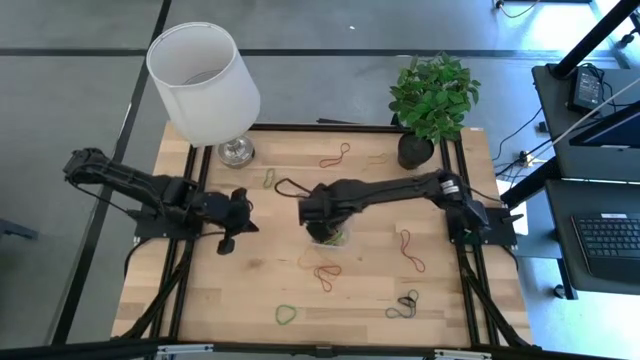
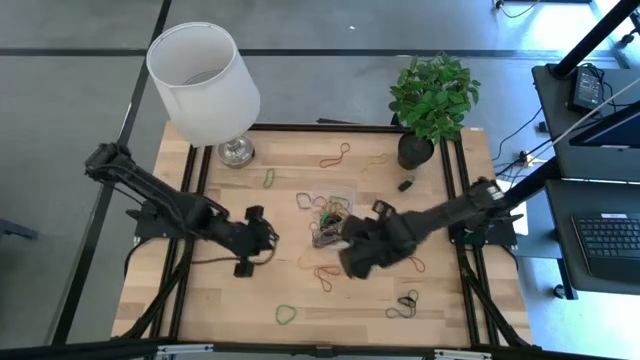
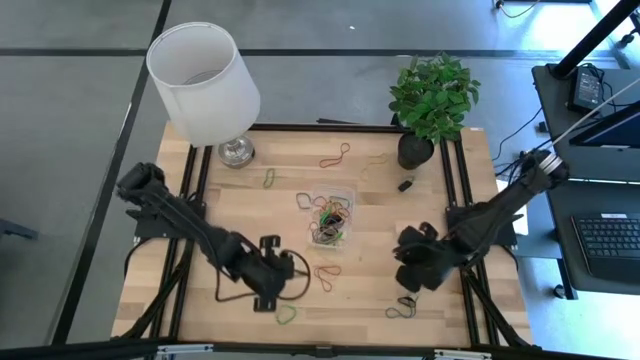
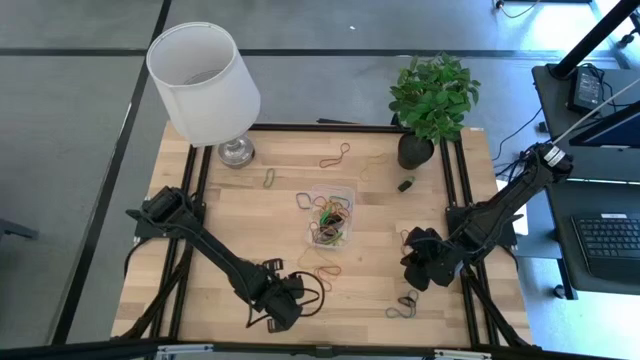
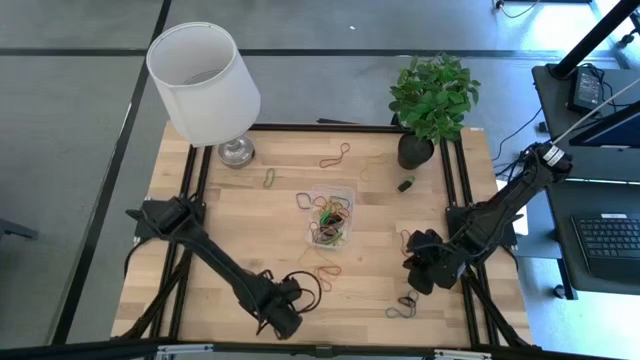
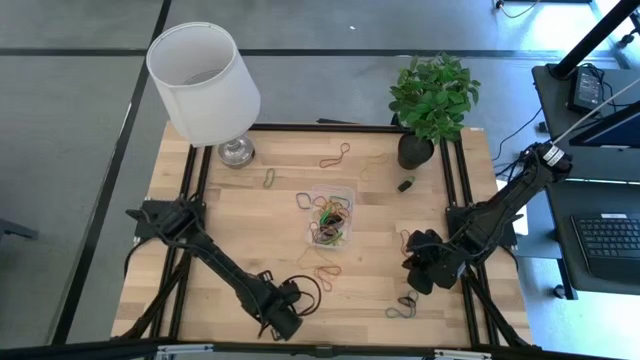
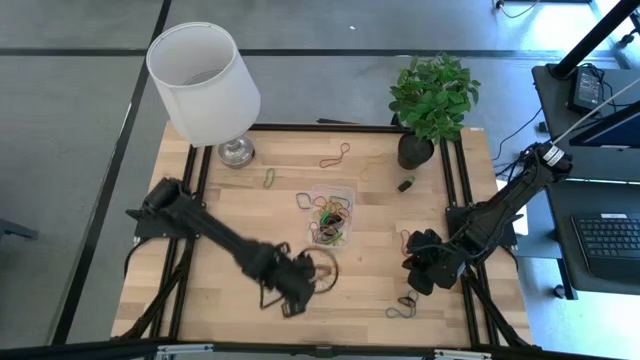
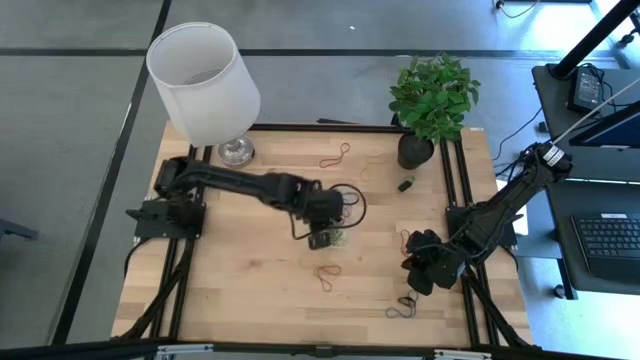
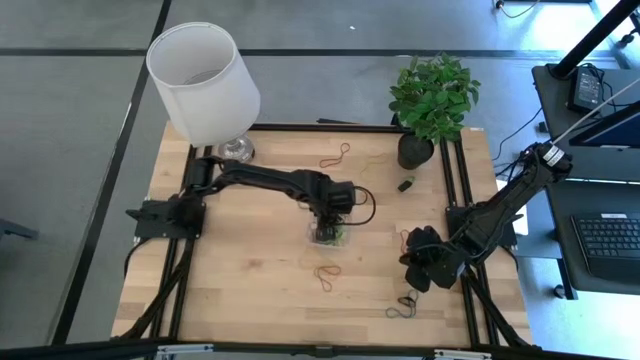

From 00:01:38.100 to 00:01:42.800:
Task: Pick and place rubber bands into bin
Put the bottom green rubber band into the bin

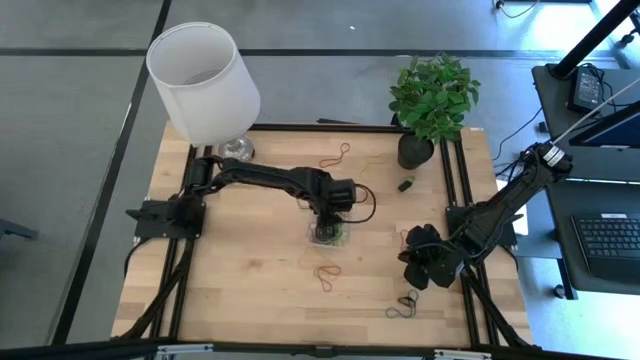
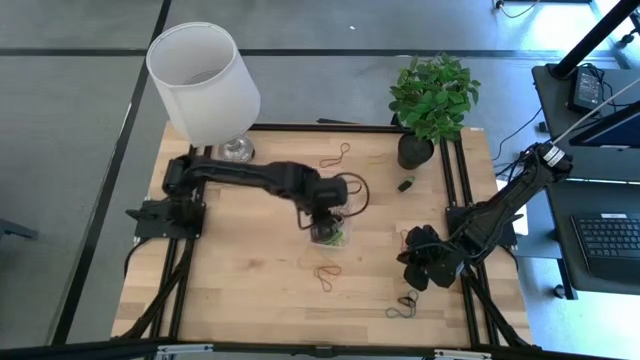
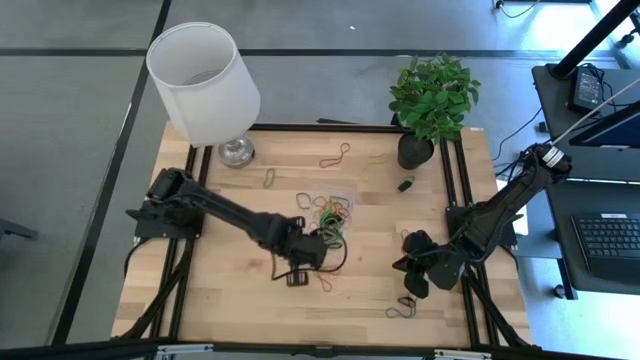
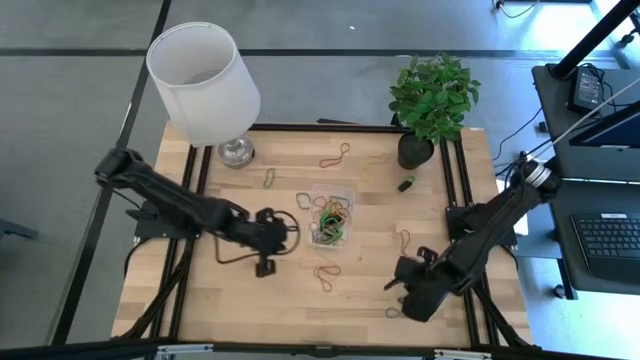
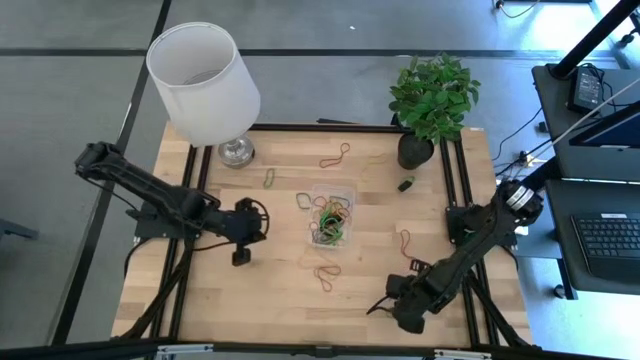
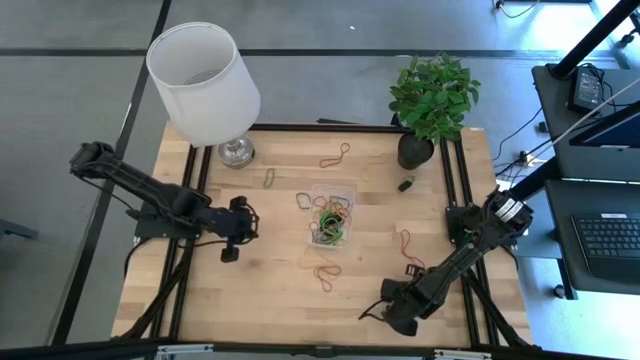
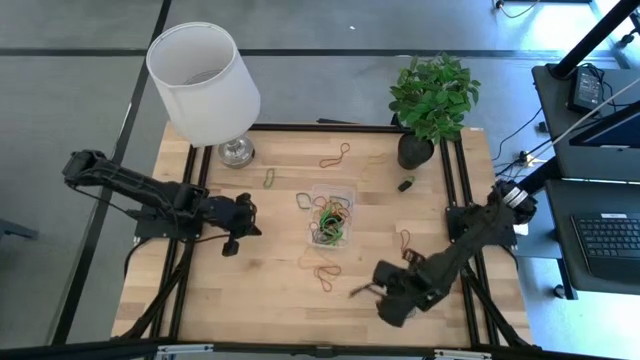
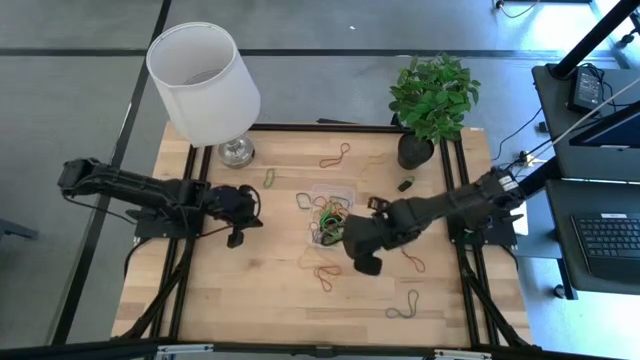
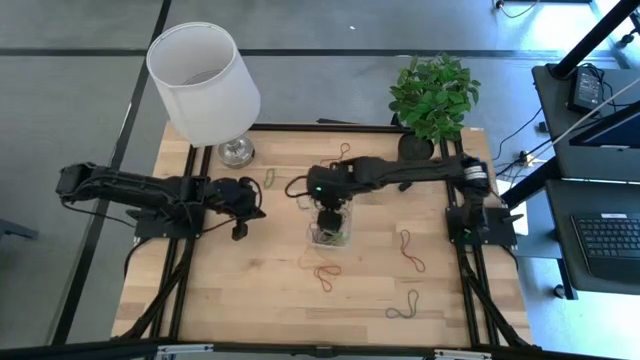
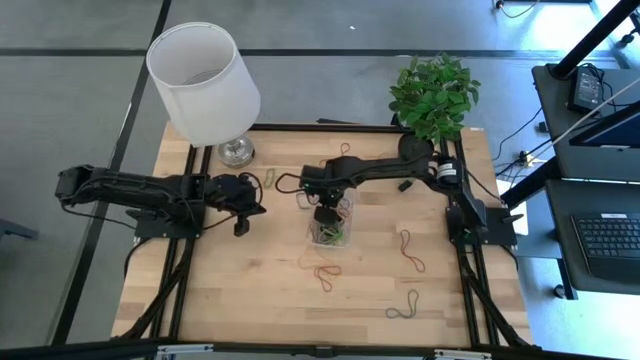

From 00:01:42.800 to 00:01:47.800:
Put the bottom black rubber band into the bin

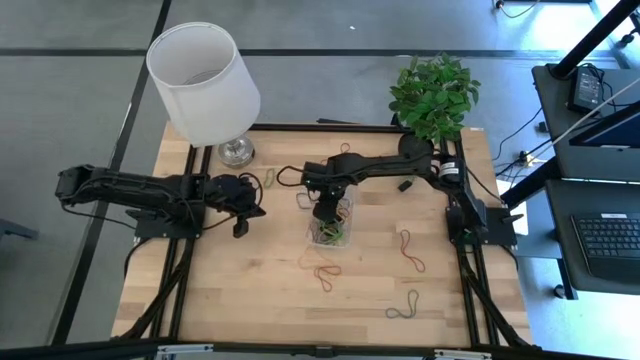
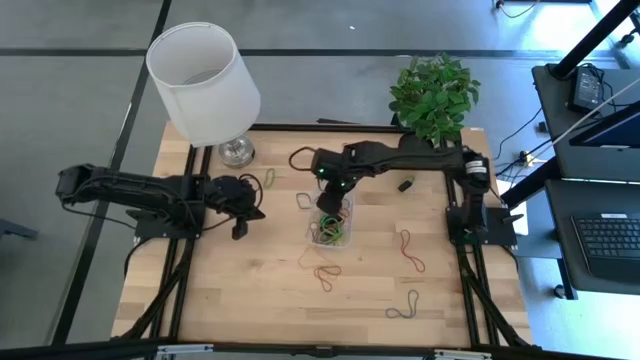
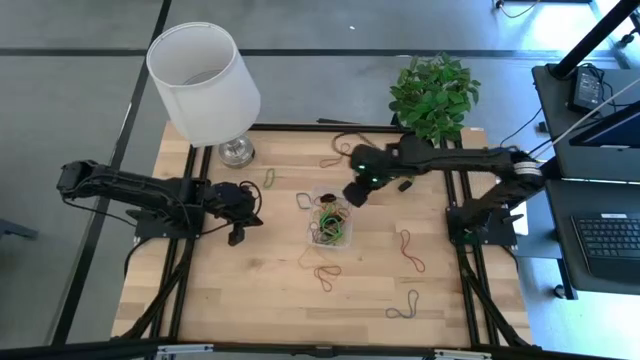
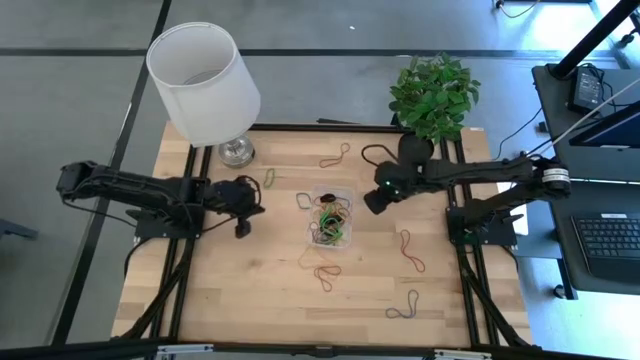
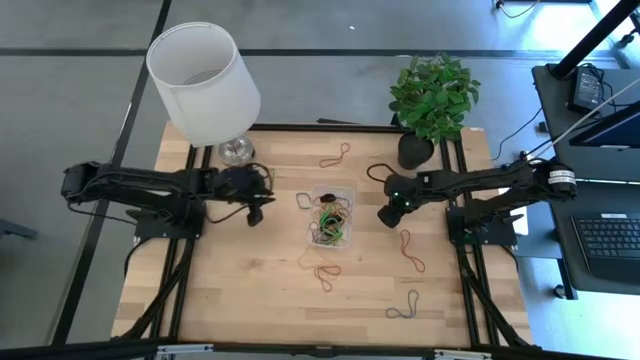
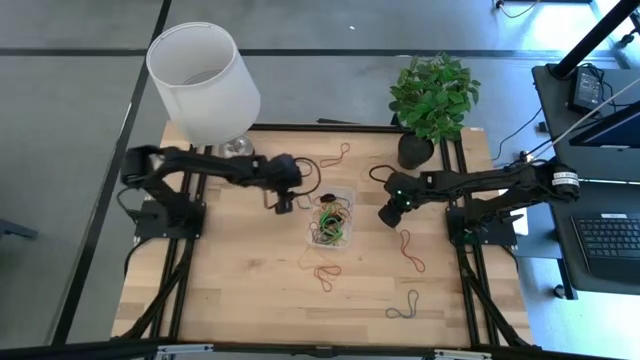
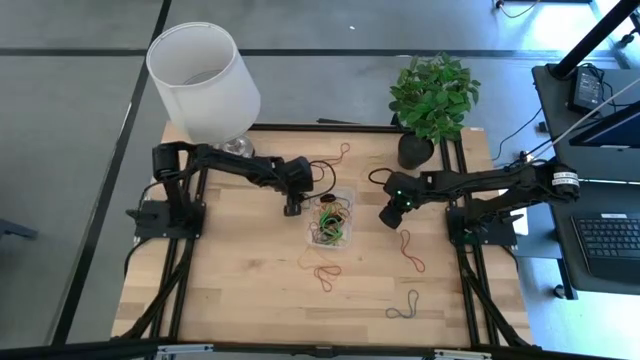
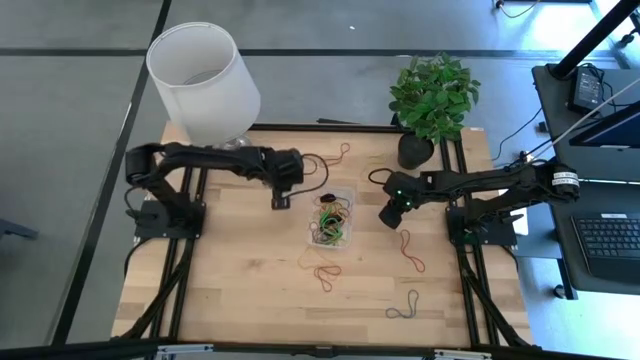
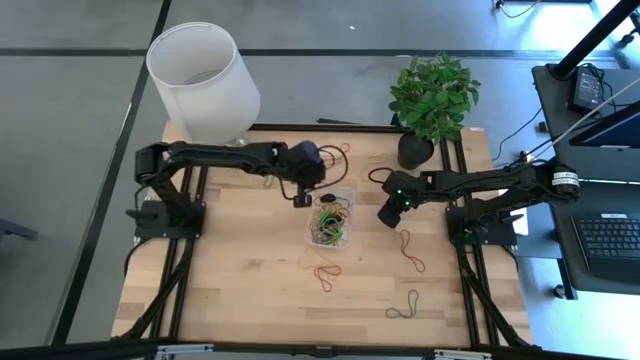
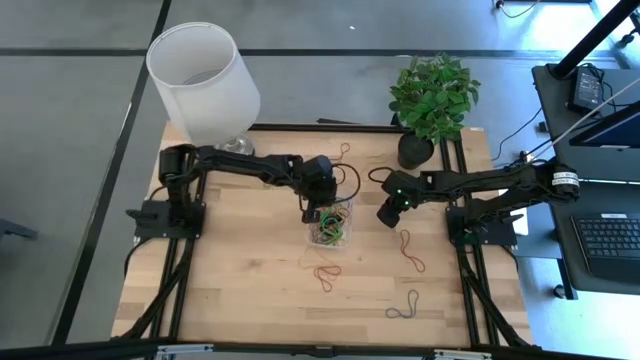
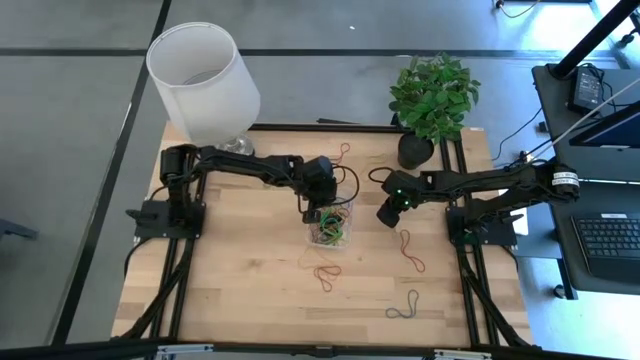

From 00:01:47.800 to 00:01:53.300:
Put the top blue rubber band into the bin

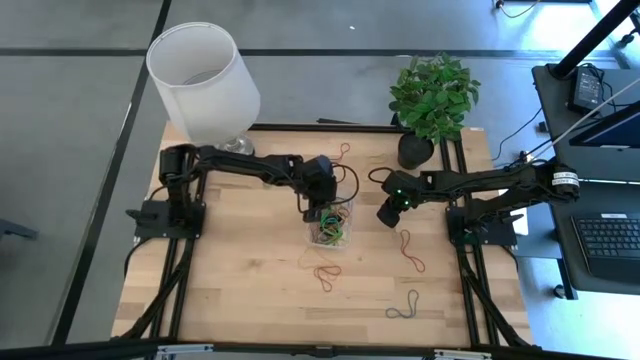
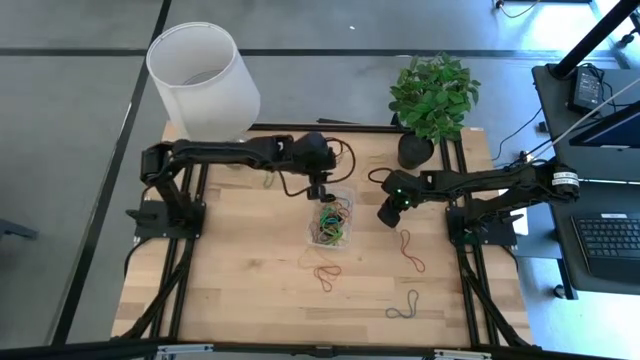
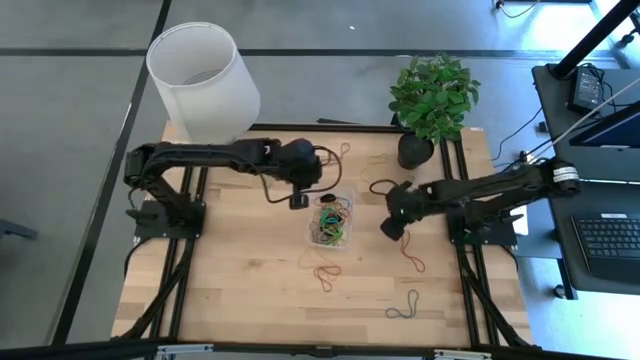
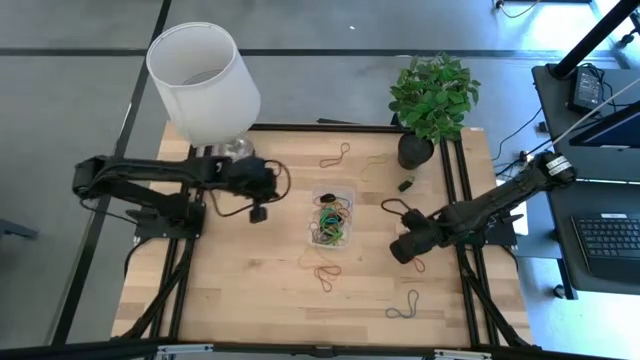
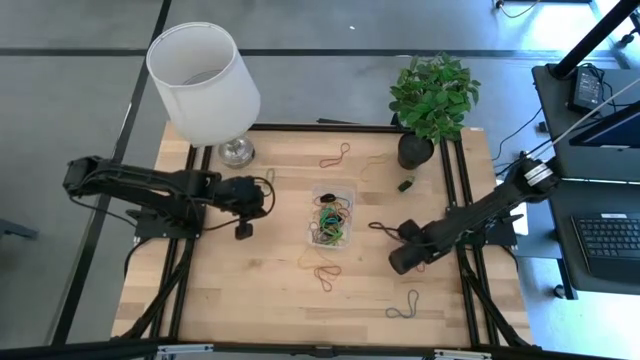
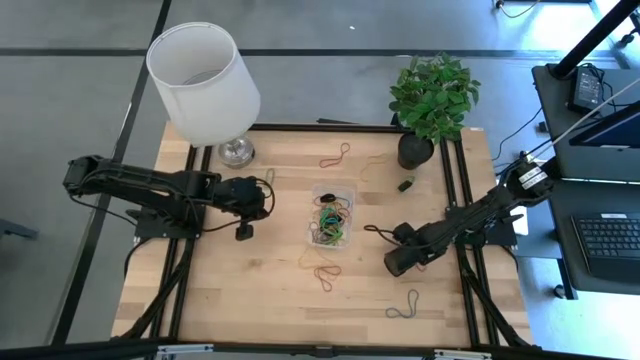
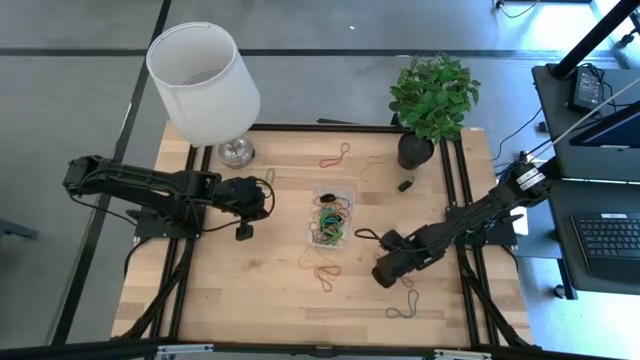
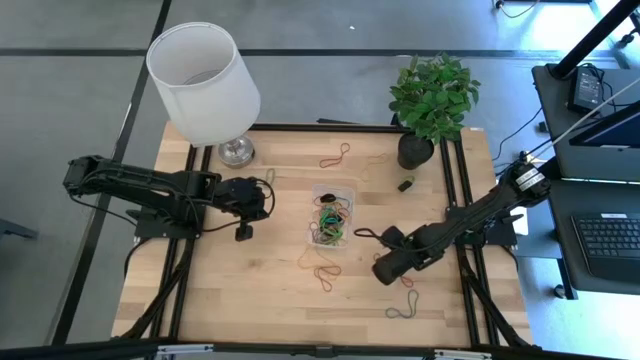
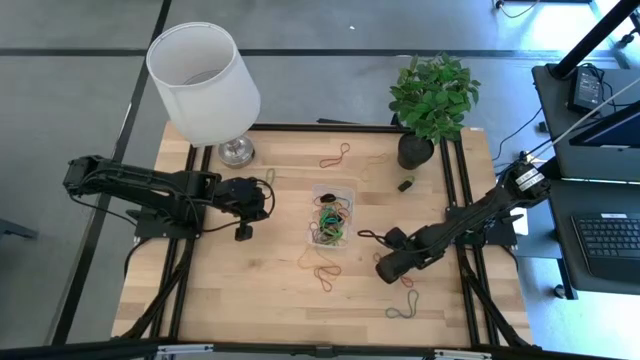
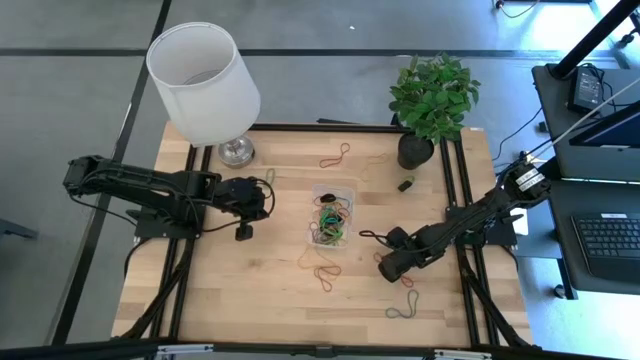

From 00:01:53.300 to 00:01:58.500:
Put the bottom right red rubber band into the bin

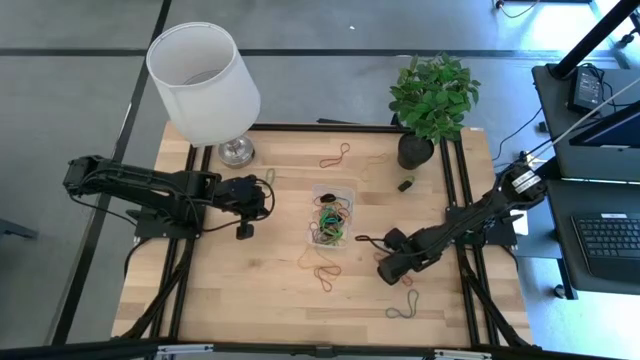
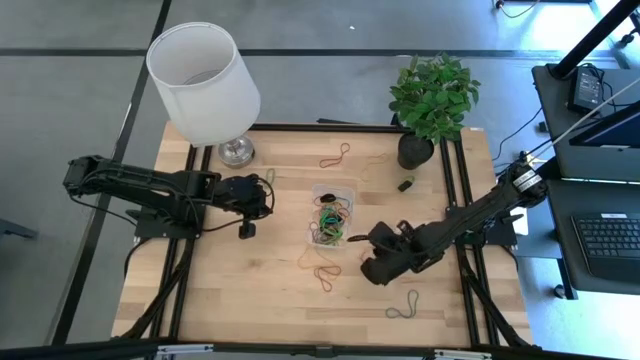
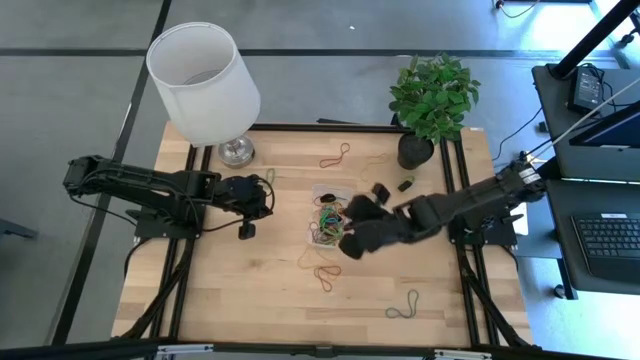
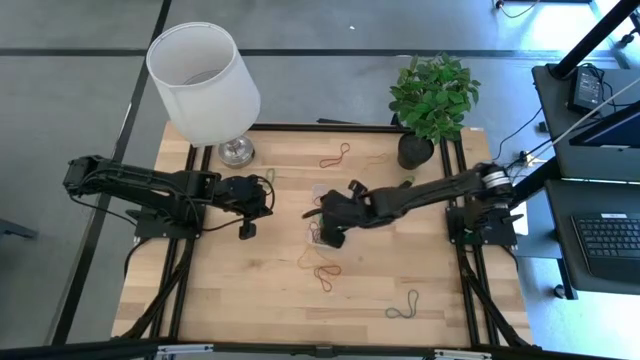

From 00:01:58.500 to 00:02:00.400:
Put the bottom right red rubber band into the bin
